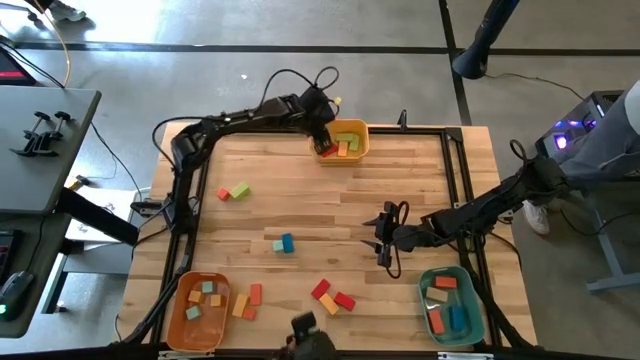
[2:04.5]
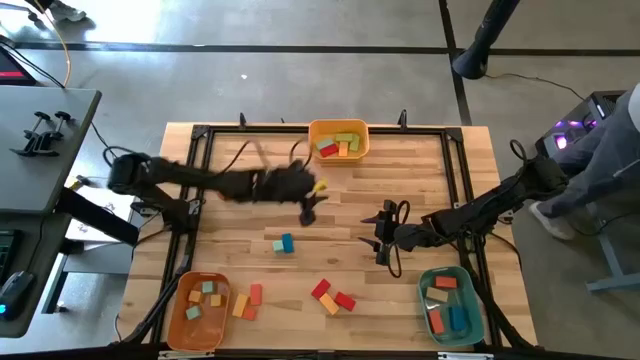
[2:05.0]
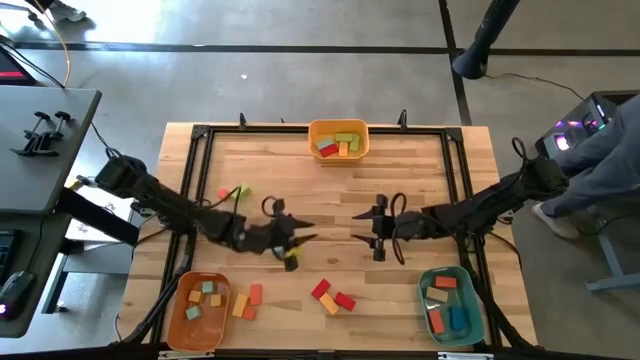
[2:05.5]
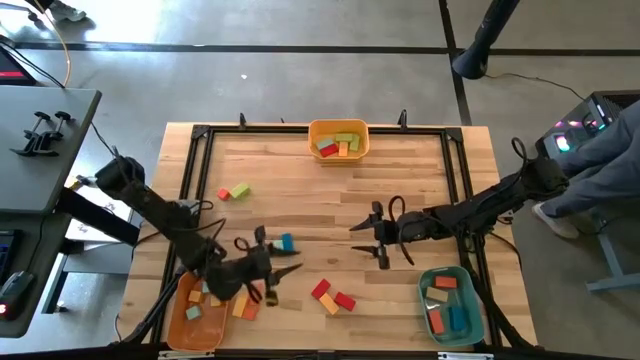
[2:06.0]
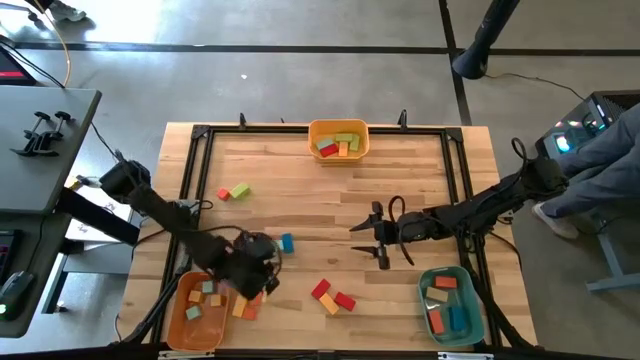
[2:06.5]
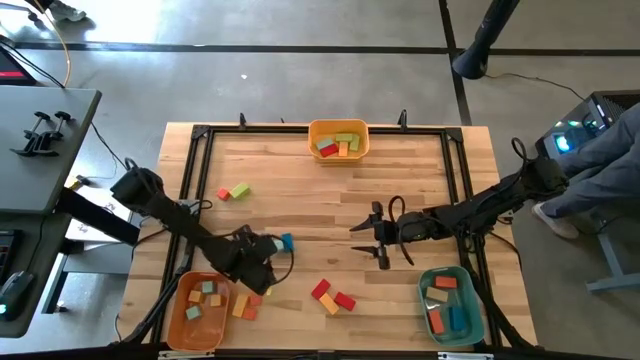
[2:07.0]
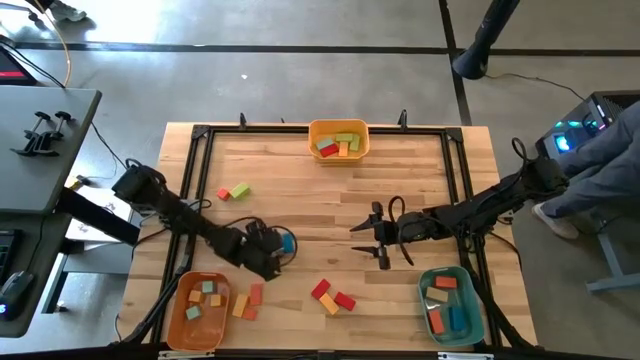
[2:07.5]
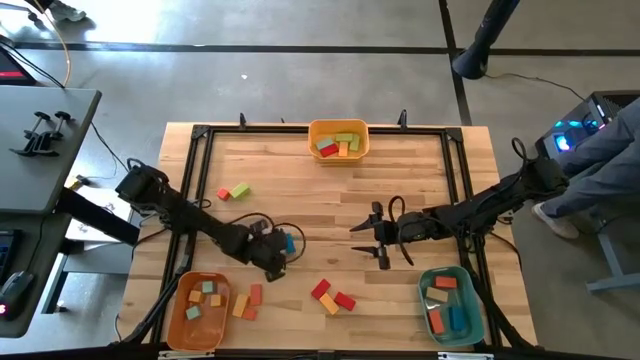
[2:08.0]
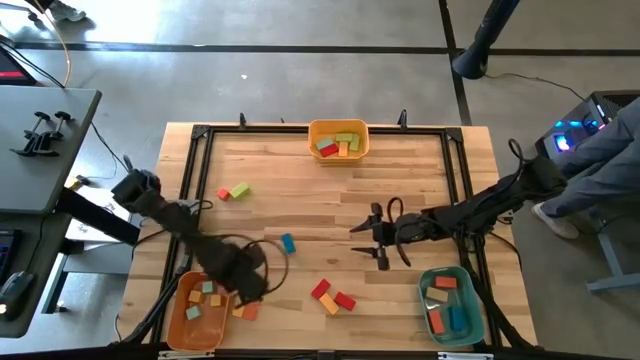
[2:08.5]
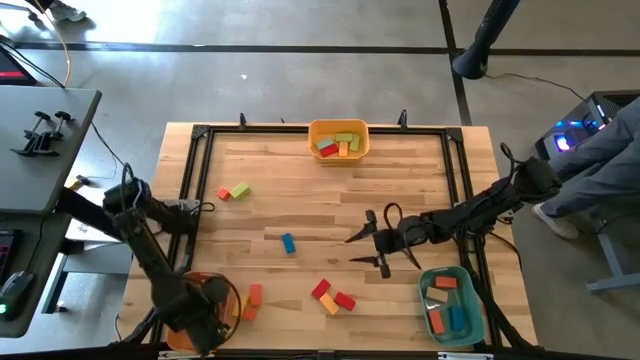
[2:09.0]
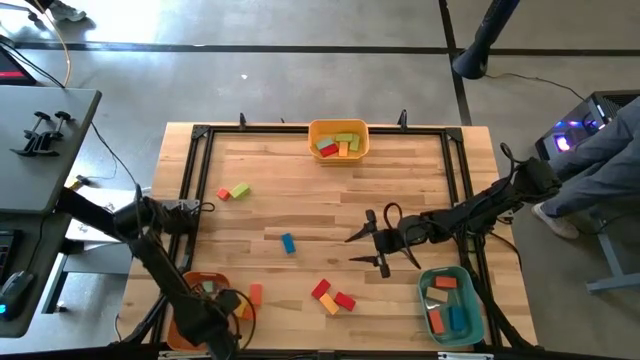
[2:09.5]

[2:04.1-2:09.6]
Task: Sort blocks by size
Put the light blue square block into the orange bin

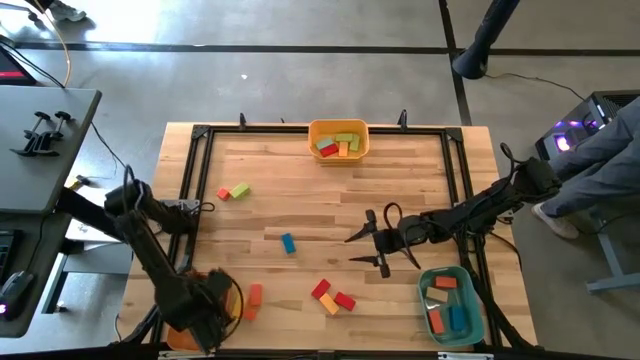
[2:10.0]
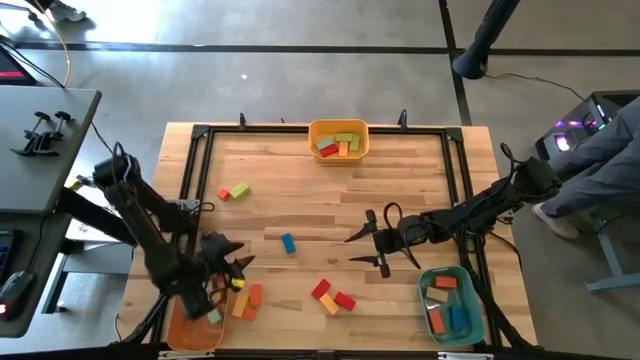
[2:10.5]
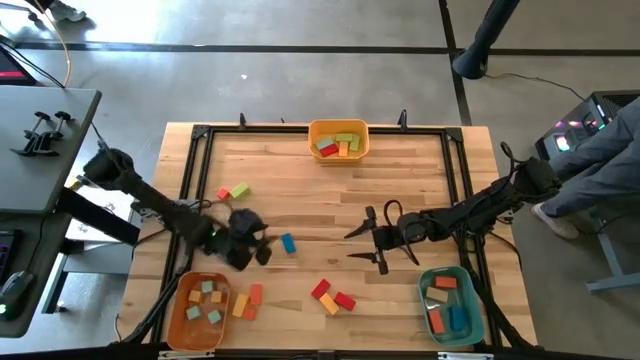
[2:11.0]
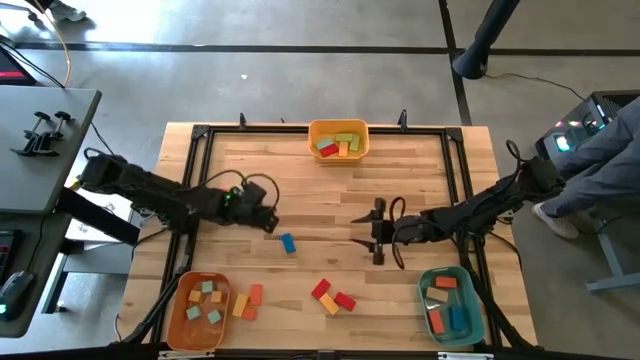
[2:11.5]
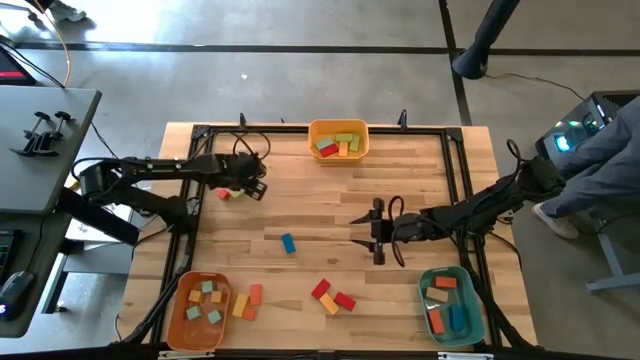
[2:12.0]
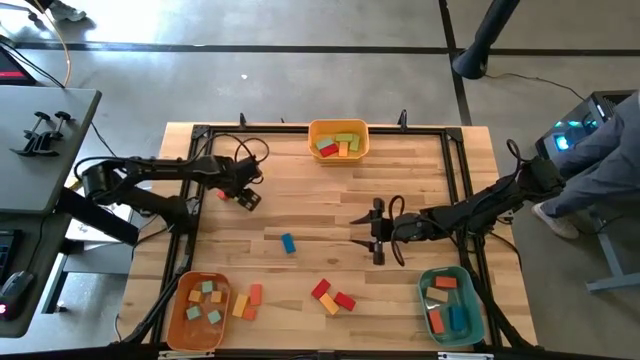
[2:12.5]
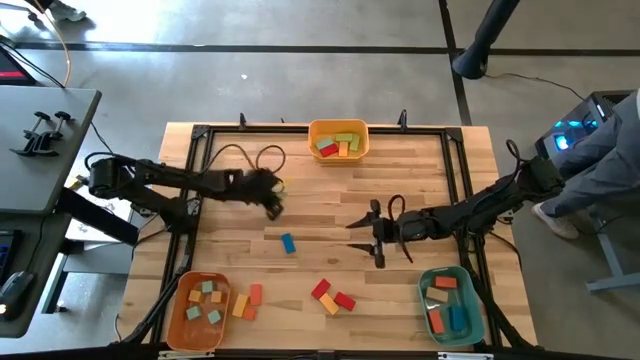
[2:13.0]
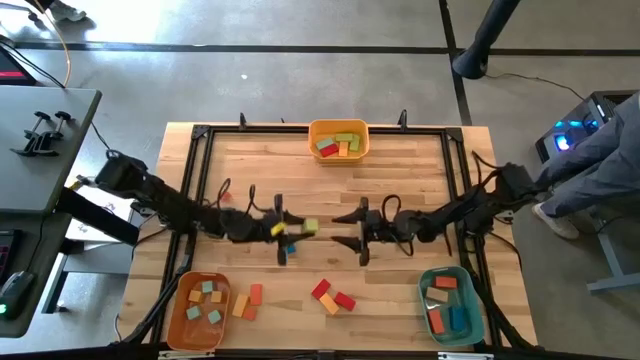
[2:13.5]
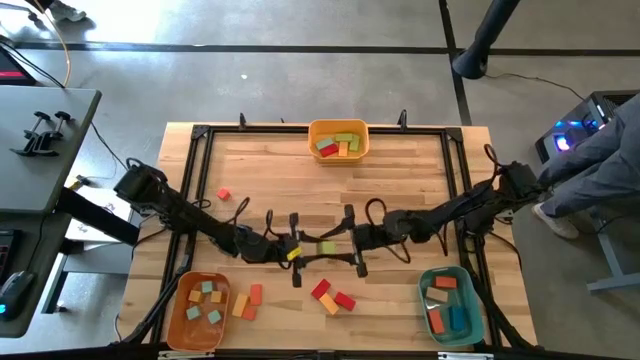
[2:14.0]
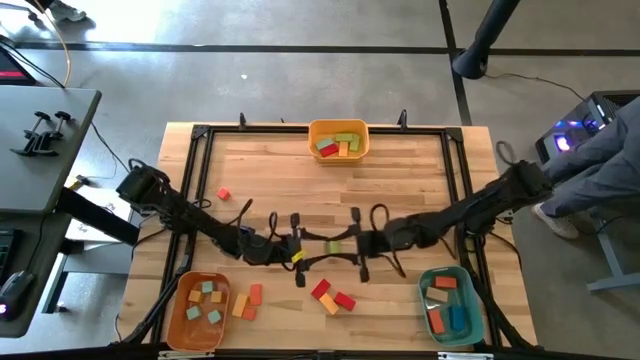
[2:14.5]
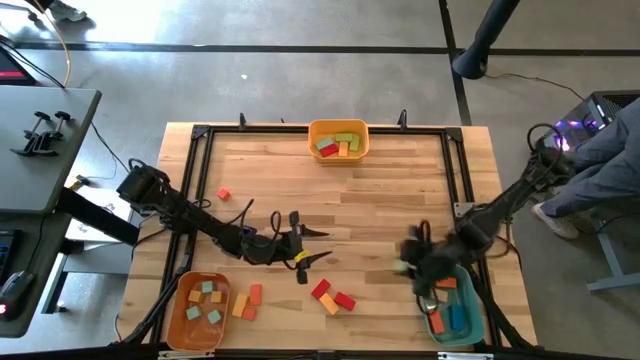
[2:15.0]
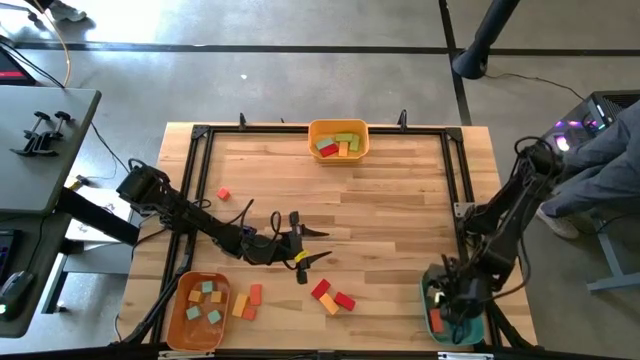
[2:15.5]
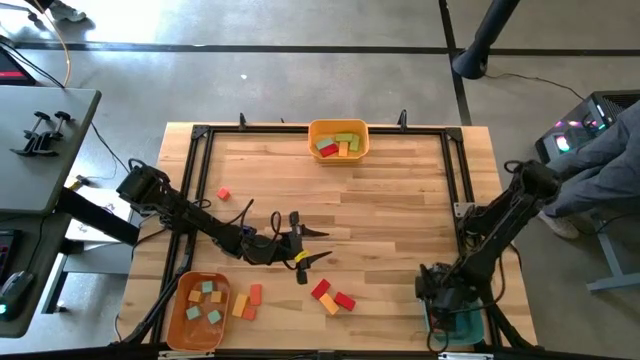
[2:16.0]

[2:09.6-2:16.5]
Put the large green rectangle block into the green bin

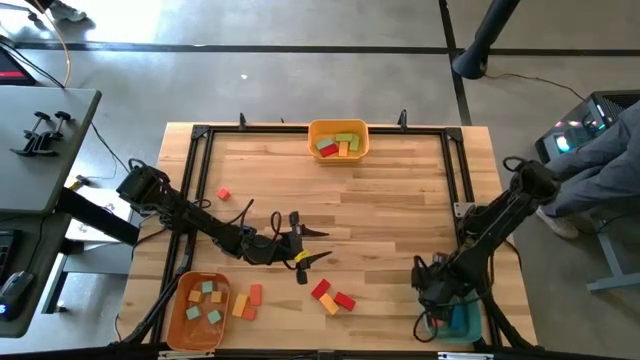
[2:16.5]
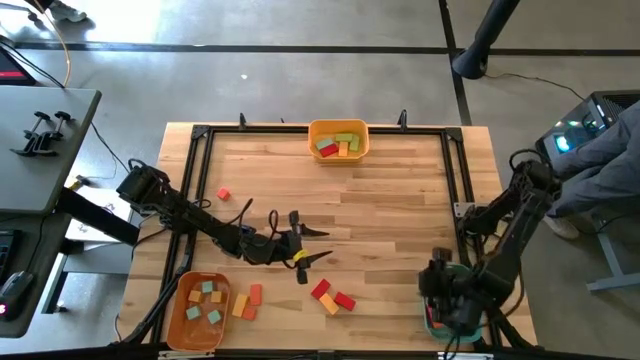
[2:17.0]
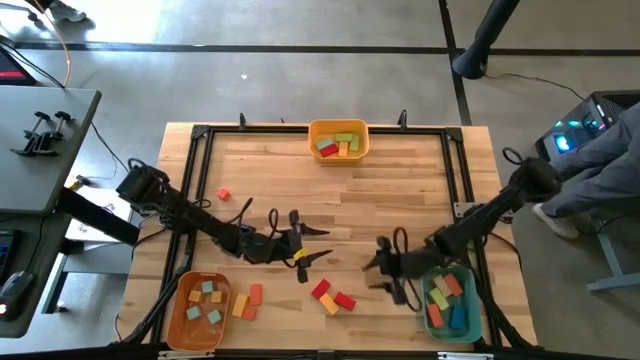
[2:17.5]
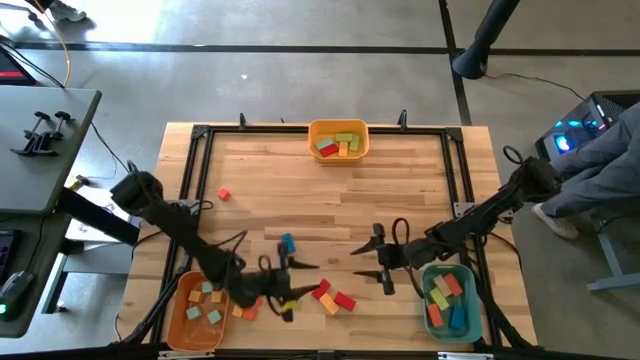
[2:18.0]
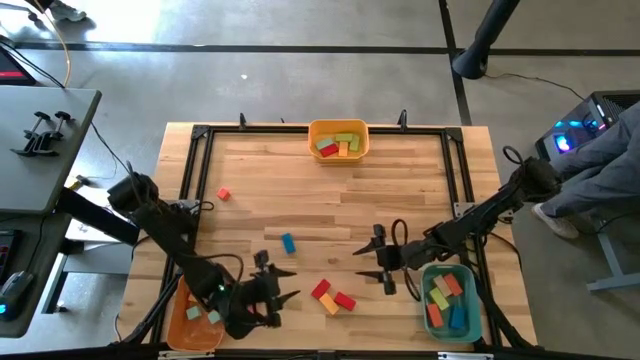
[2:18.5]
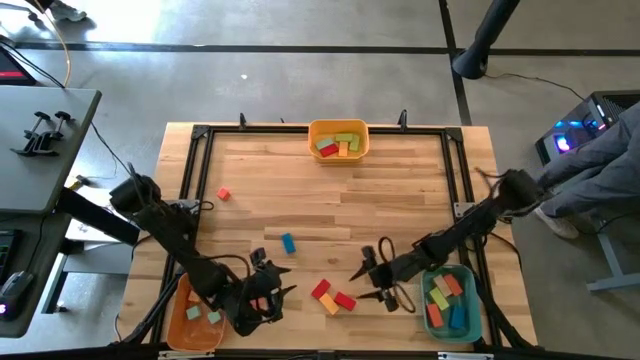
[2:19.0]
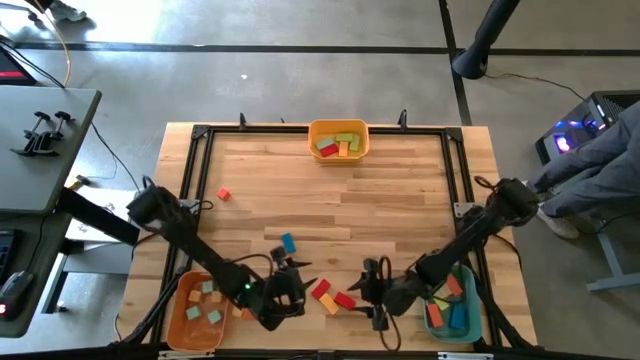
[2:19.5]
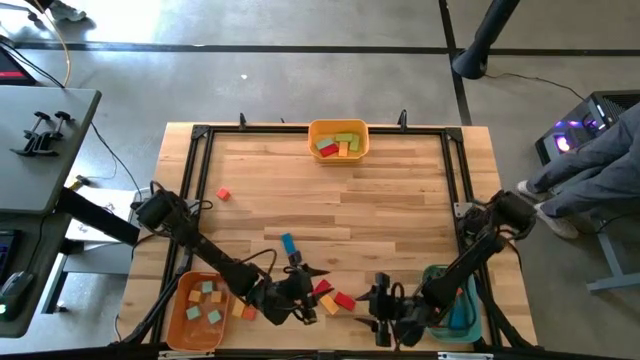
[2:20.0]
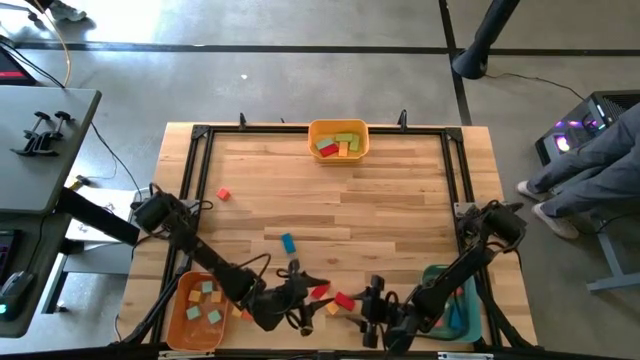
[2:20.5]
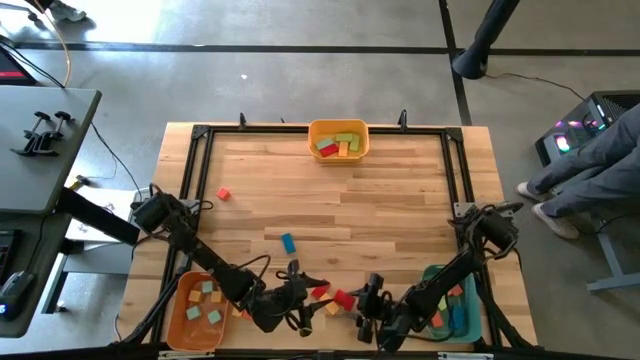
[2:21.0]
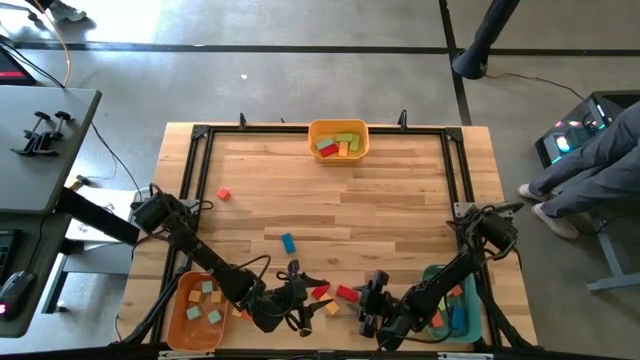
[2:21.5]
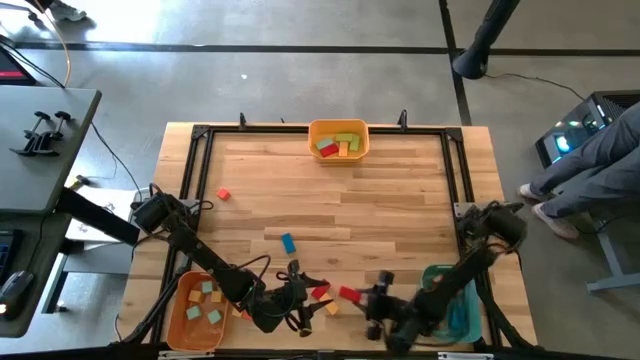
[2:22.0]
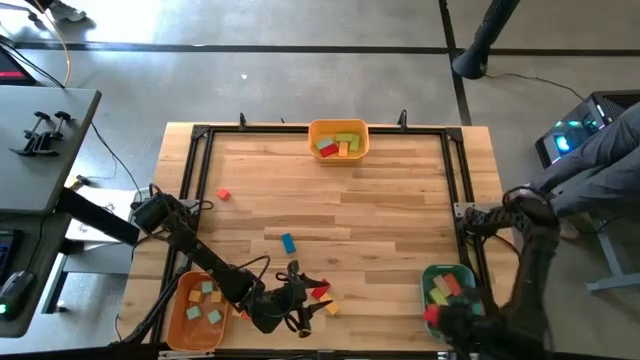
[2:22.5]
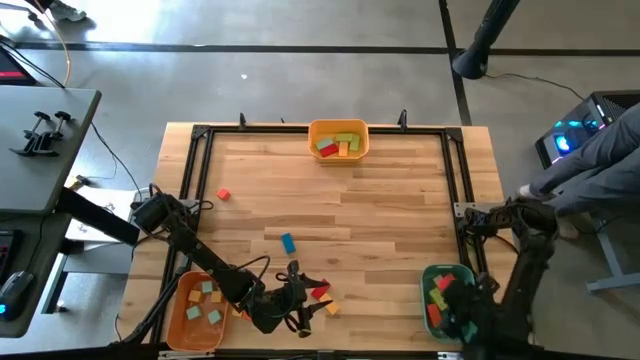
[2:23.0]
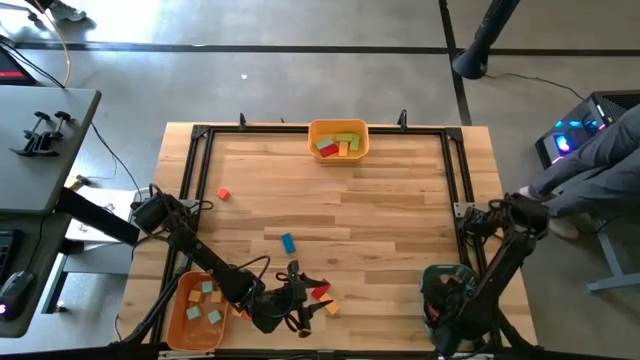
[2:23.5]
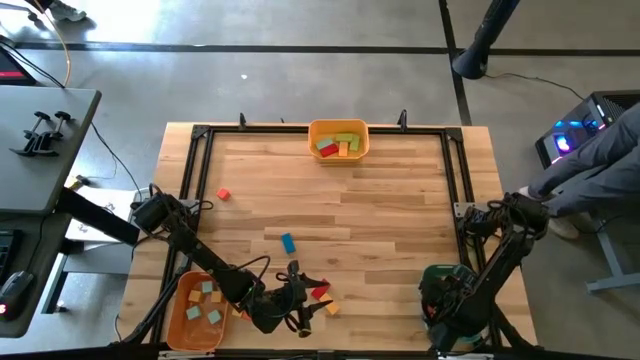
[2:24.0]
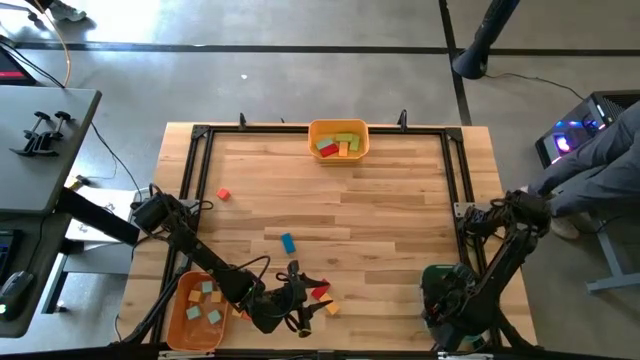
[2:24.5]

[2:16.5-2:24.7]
Put the large red rectangle block into the green bin

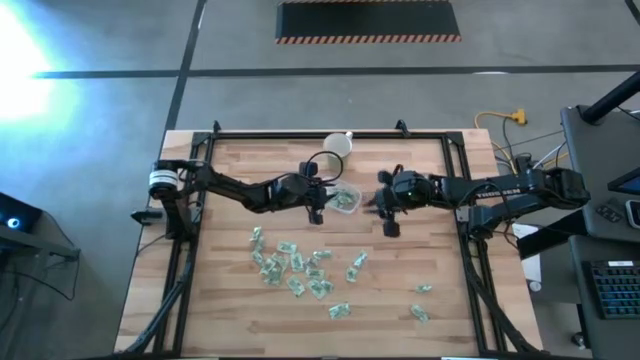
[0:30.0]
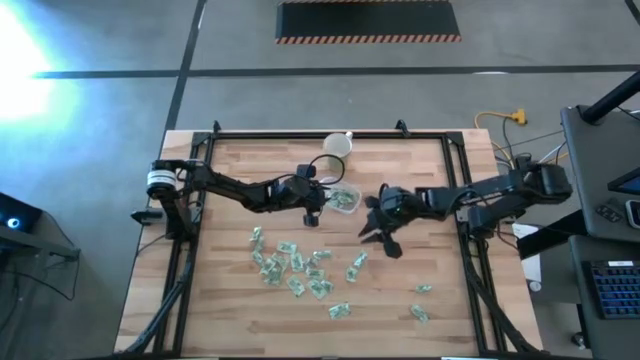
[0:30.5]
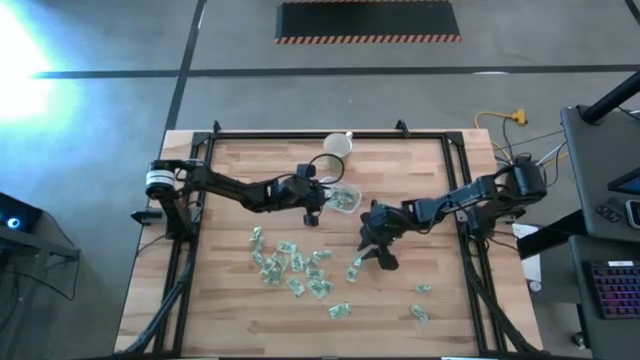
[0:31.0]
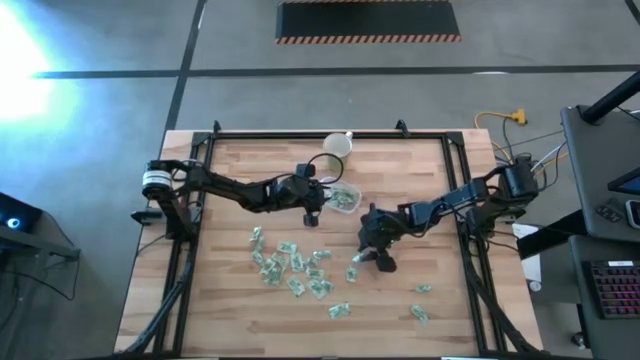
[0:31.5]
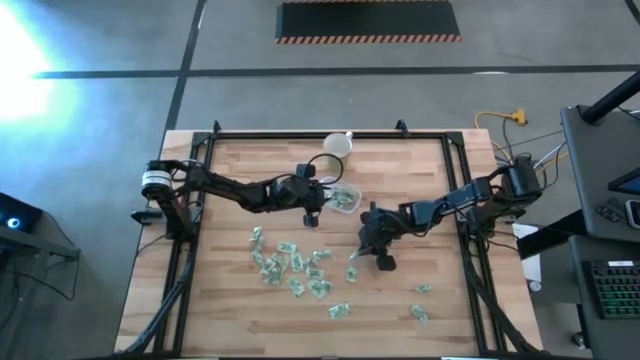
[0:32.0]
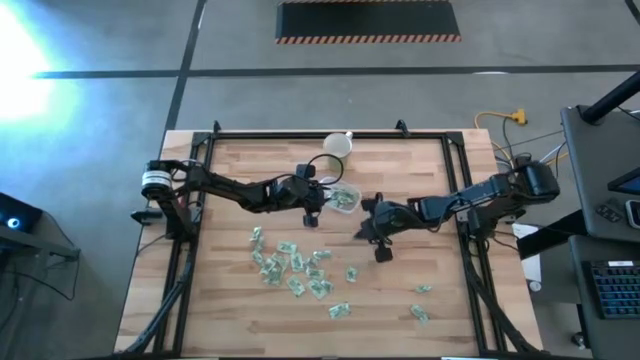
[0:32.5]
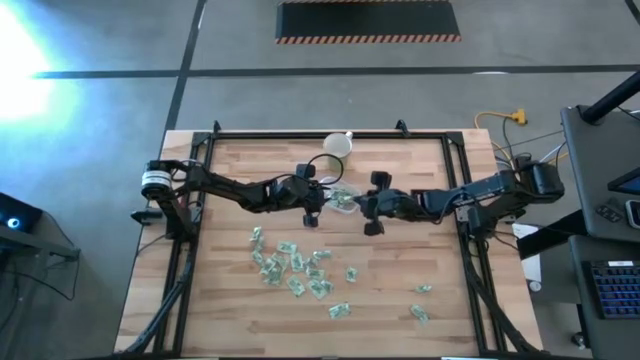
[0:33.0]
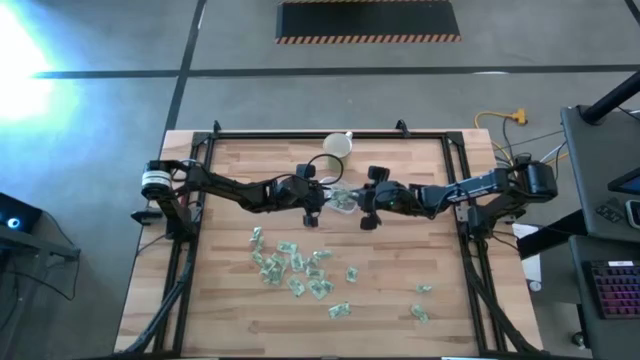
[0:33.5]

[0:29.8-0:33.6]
Task: Pick and place items into bin
Put the green stevia packet into the transparent bin
